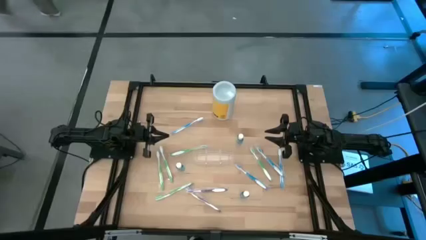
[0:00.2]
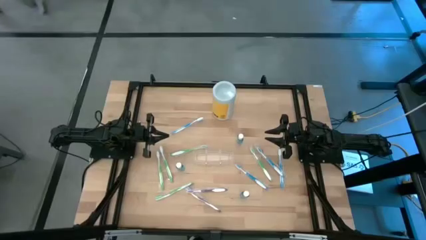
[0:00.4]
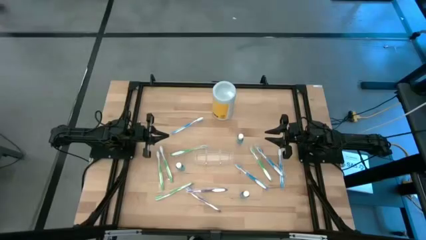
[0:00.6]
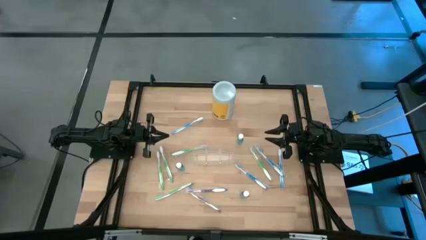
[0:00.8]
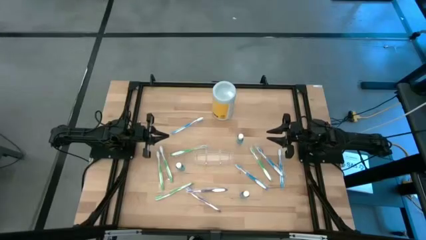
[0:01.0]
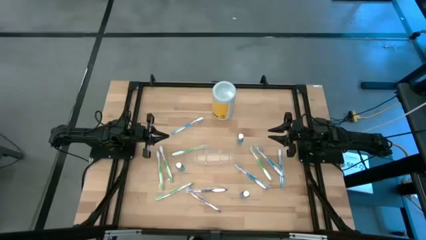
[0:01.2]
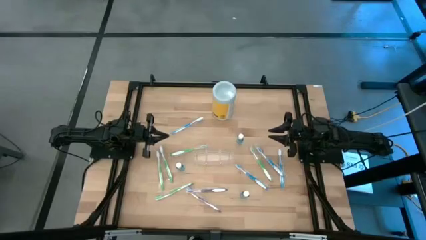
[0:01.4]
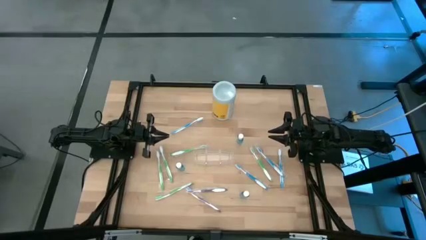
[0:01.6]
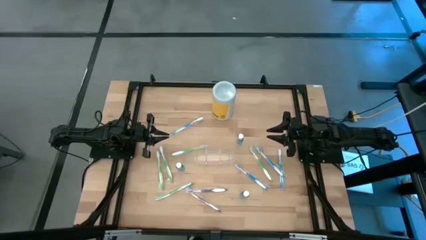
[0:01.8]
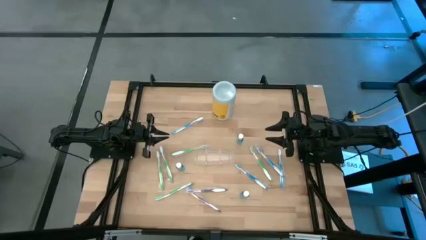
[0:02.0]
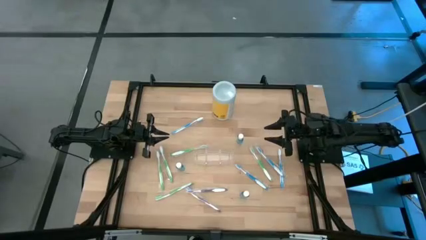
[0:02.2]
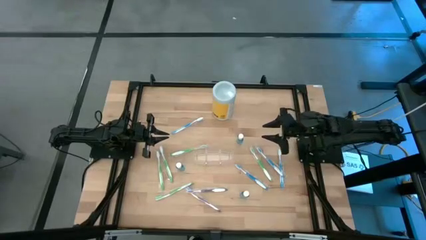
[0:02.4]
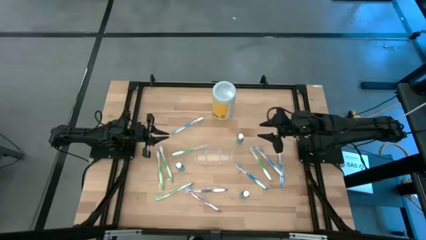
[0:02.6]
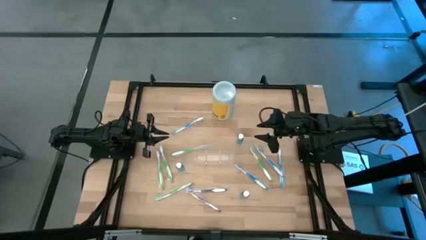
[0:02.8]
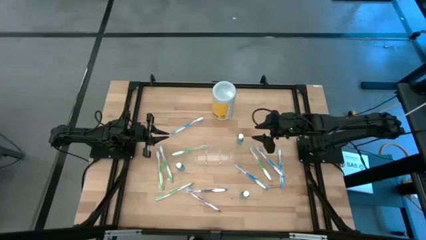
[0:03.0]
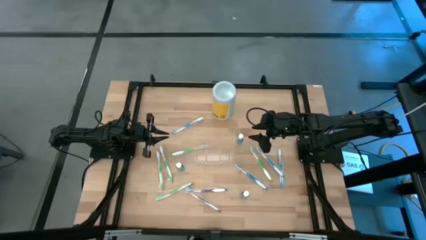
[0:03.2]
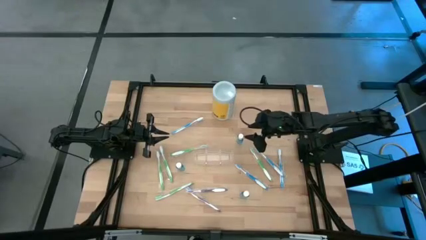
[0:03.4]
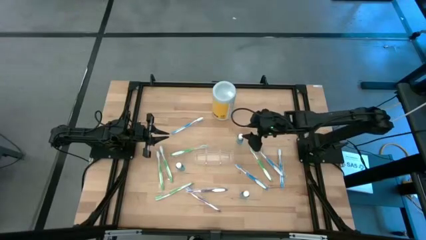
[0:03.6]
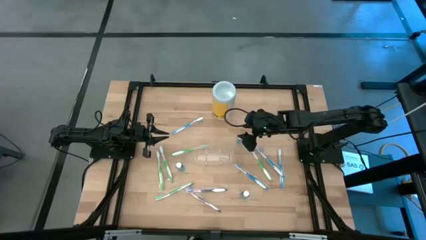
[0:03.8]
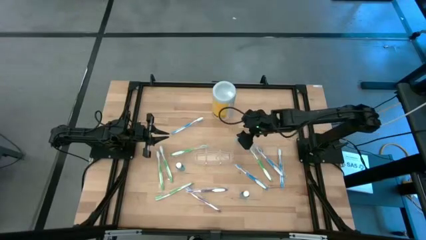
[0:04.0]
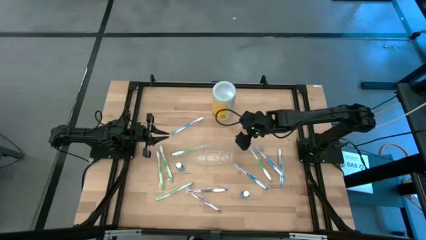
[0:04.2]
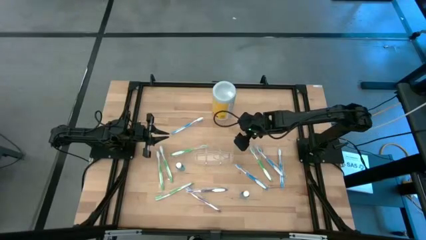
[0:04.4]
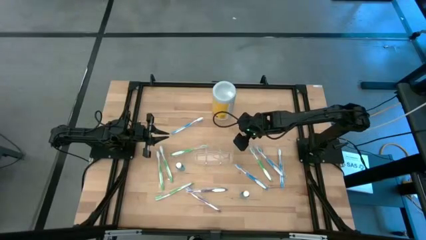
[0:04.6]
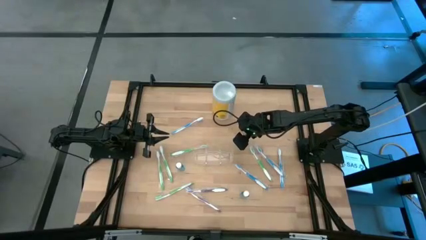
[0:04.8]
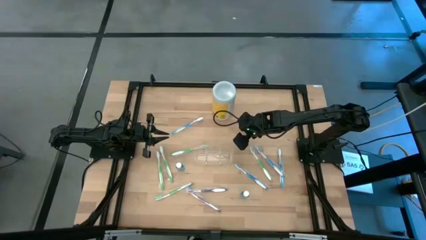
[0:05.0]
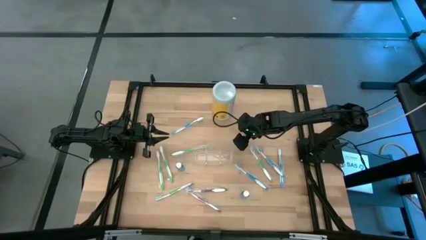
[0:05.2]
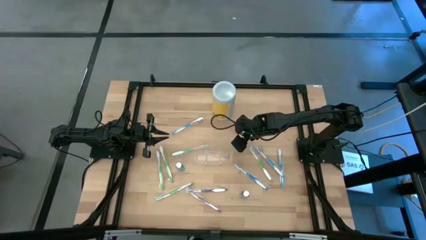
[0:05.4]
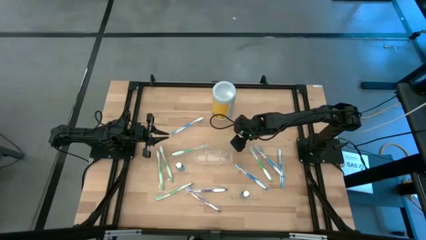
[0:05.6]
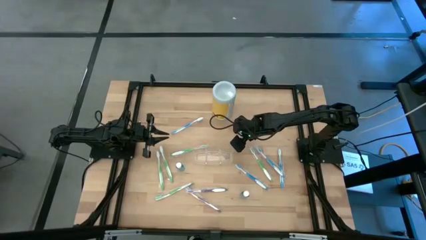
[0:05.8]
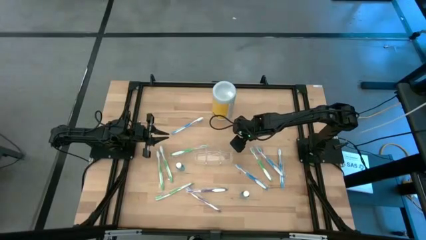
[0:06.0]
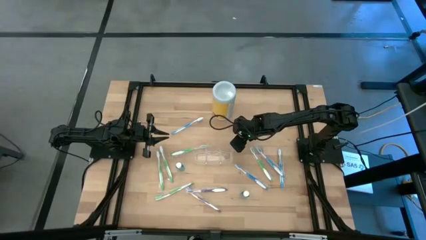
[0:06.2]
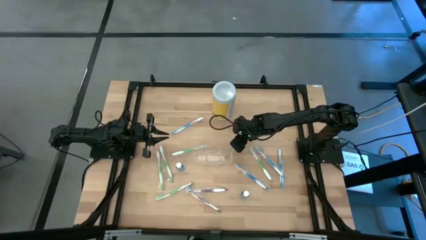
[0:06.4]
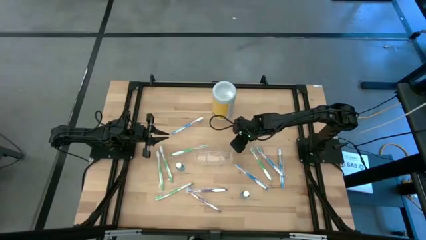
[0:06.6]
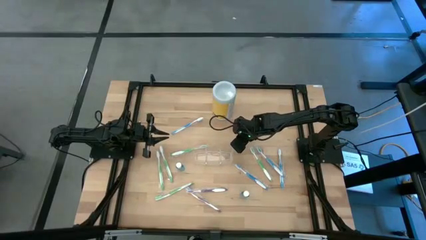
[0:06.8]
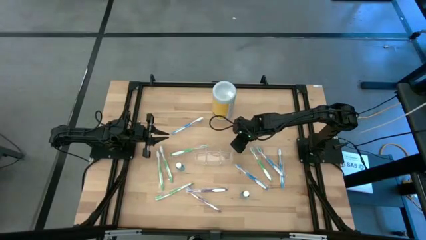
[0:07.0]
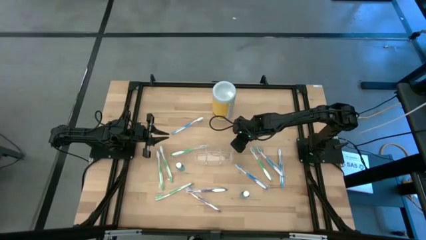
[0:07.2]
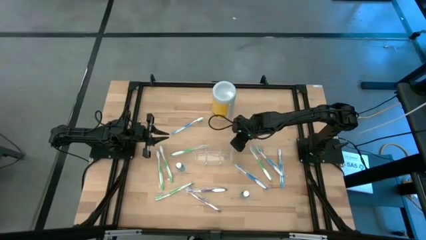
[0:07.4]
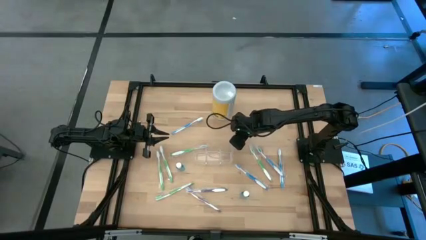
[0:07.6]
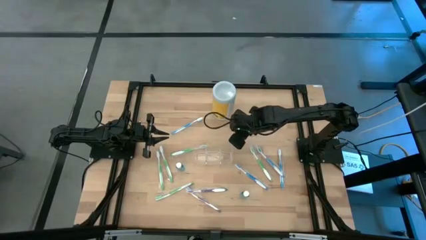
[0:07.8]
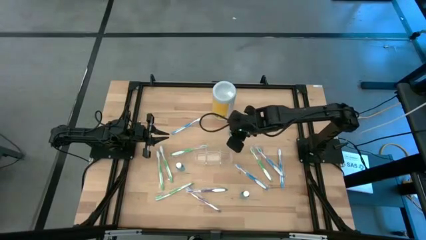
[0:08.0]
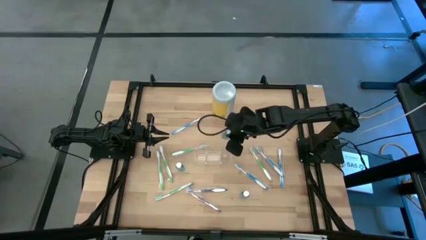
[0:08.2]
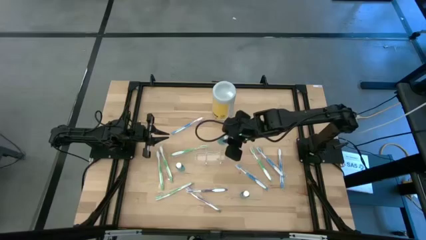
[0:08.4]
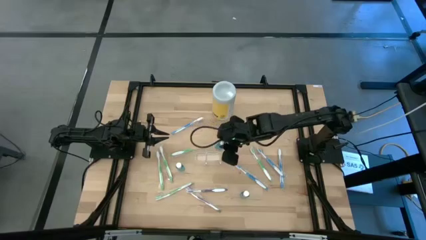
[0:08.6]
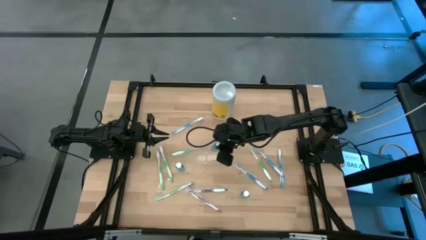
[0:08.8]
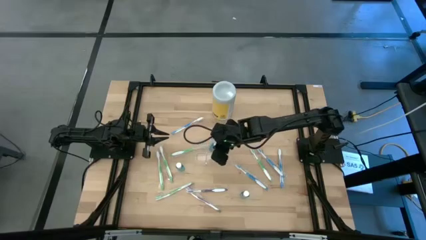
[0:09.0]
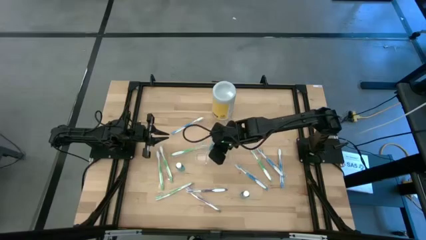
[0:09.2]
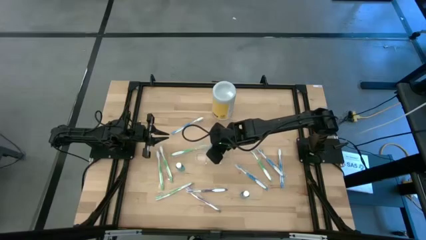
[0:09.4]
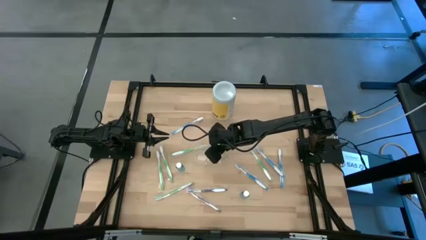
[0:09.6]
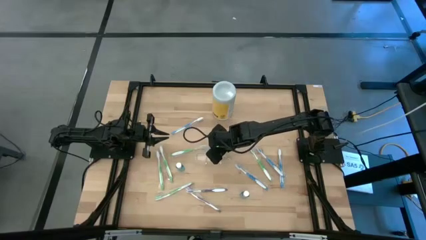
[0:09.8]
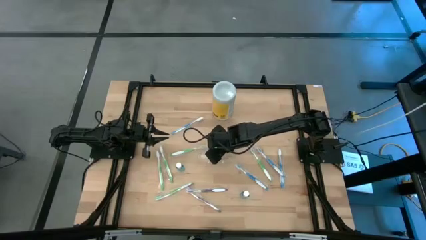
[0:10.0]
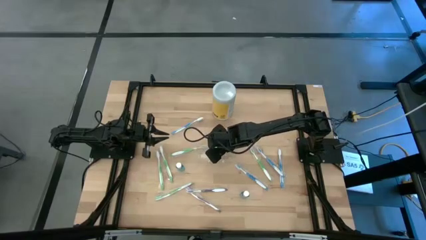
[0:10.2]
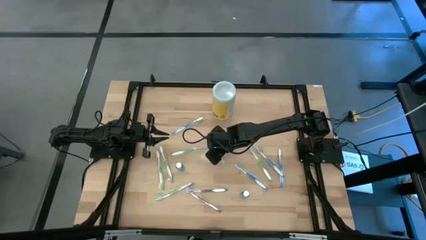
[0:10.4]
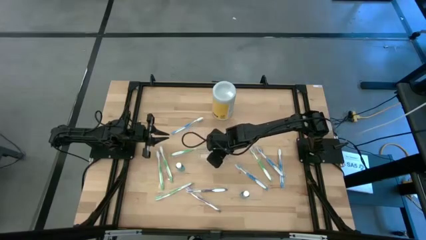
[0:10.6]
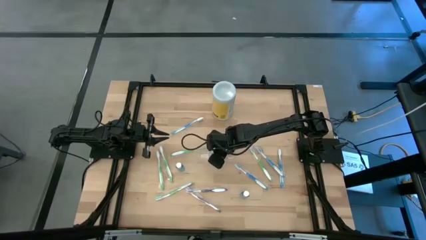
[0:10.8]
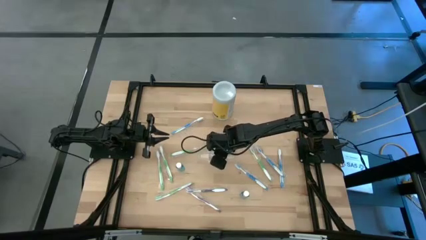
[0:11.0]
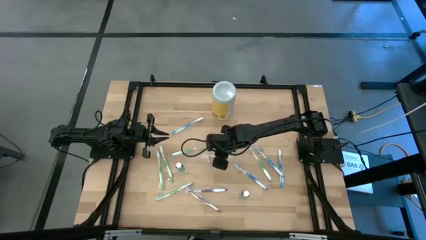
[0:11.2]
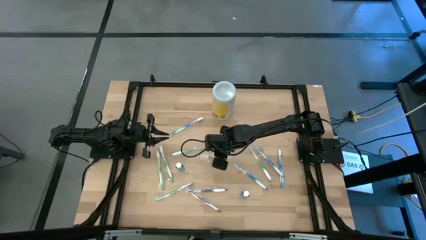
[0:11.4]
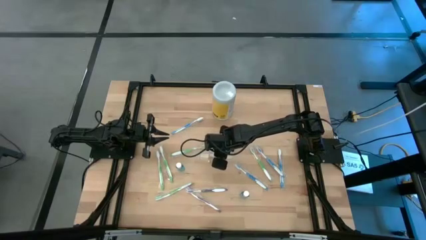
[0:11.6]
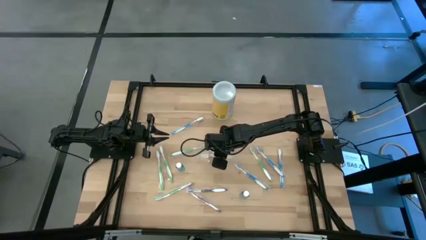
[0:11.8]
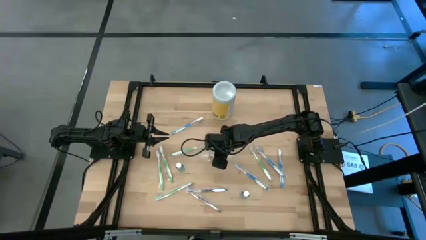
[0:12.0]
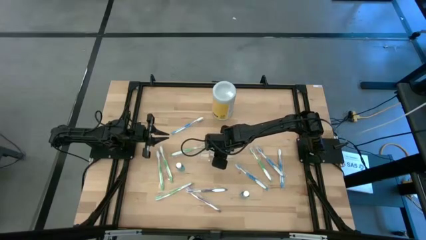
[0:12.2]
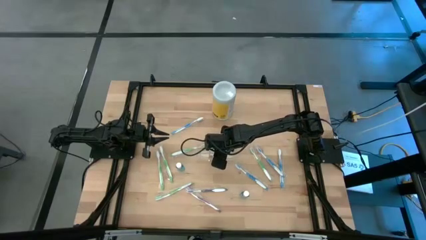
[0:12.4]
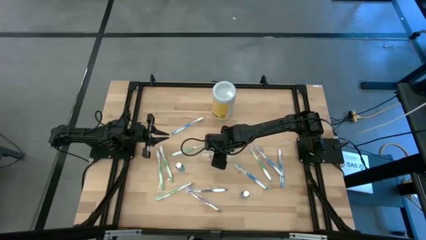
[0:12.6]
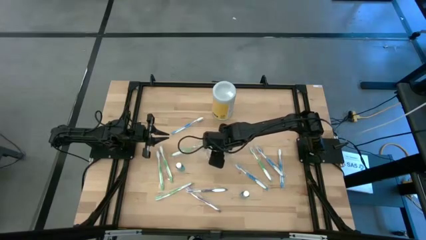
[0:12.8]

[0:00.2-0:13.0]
Task: Pick & Place toothbrushing station
Put the blue mouthwash into the transparent organizer
